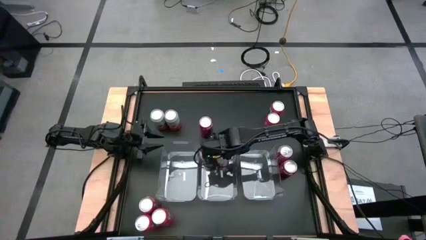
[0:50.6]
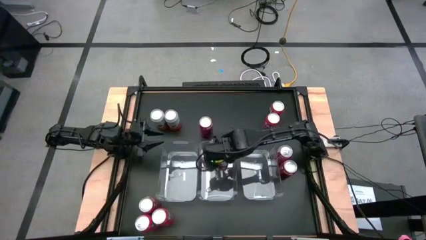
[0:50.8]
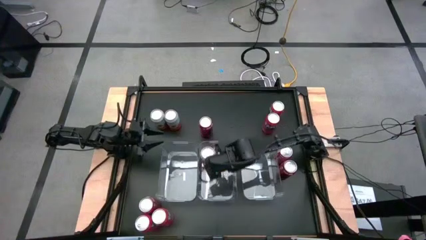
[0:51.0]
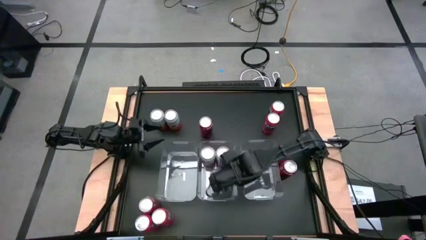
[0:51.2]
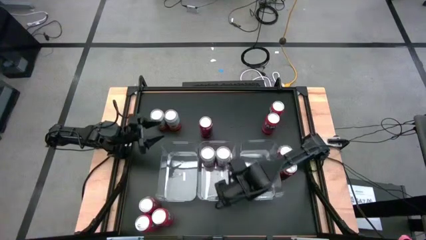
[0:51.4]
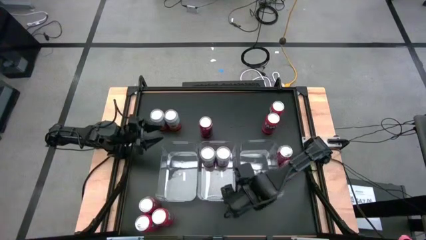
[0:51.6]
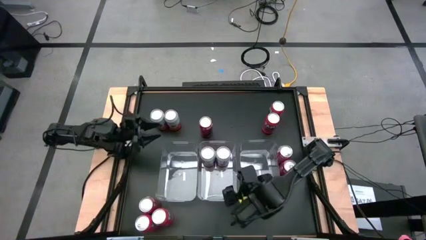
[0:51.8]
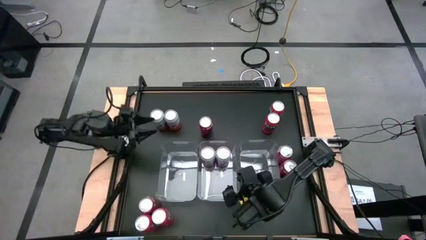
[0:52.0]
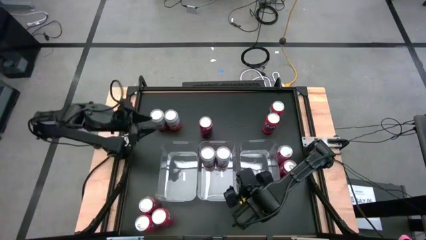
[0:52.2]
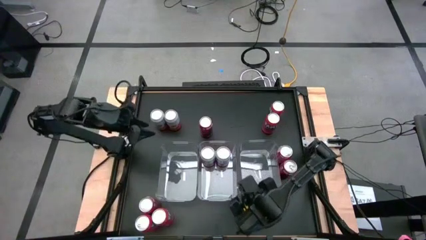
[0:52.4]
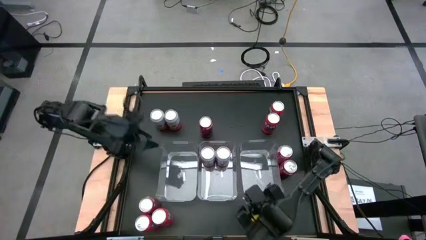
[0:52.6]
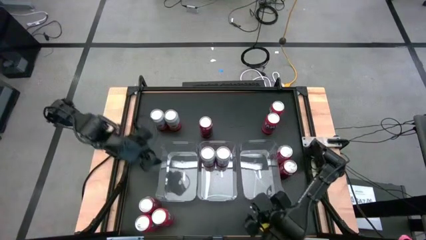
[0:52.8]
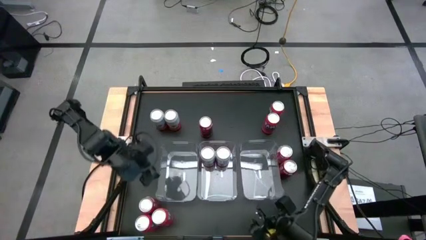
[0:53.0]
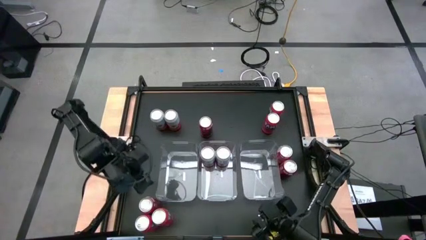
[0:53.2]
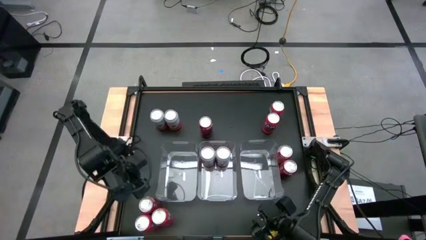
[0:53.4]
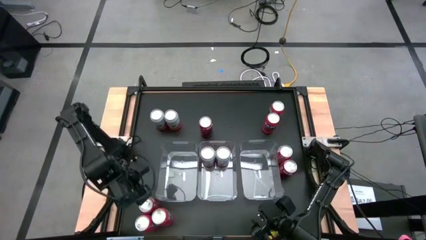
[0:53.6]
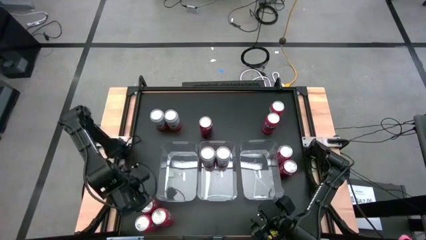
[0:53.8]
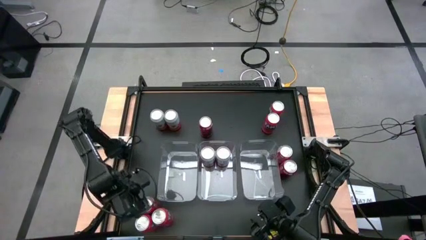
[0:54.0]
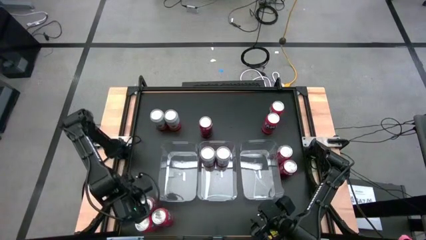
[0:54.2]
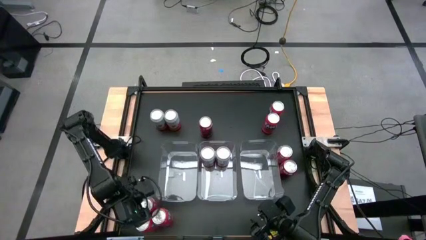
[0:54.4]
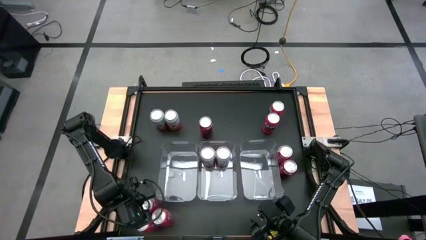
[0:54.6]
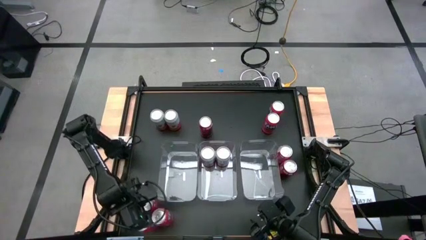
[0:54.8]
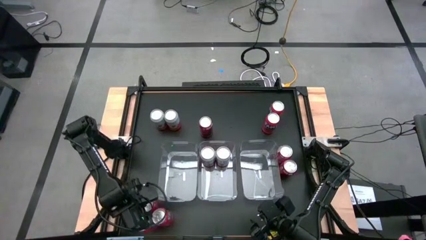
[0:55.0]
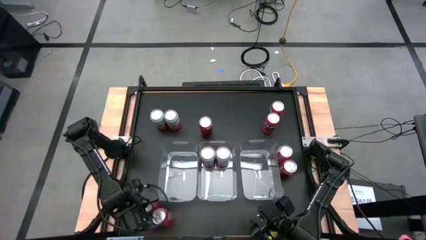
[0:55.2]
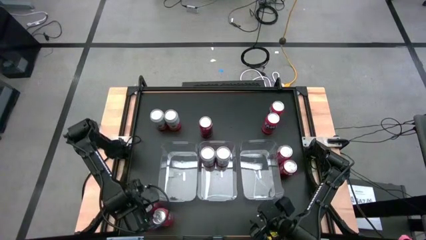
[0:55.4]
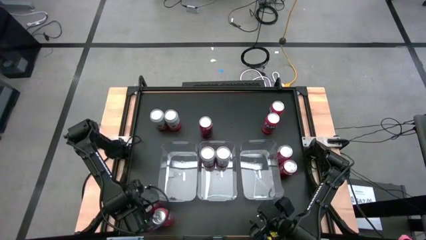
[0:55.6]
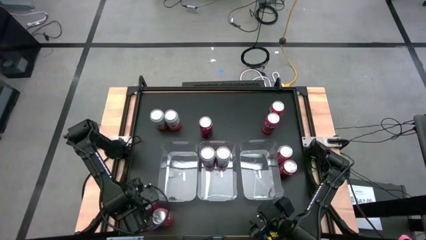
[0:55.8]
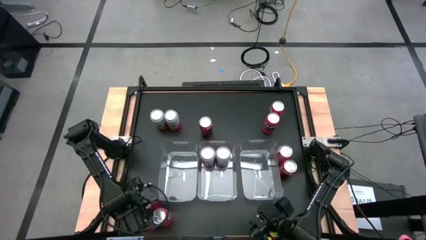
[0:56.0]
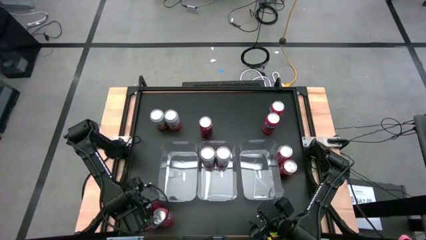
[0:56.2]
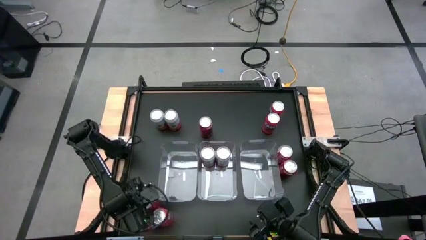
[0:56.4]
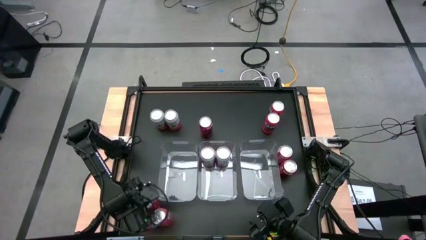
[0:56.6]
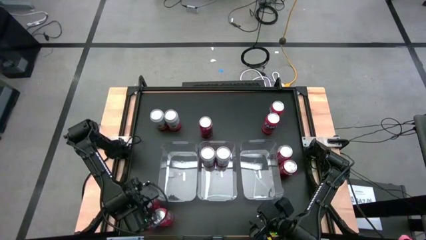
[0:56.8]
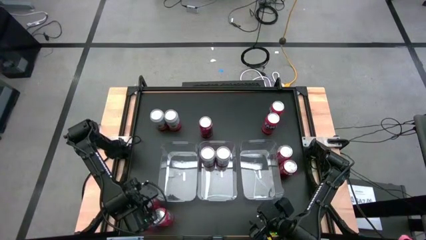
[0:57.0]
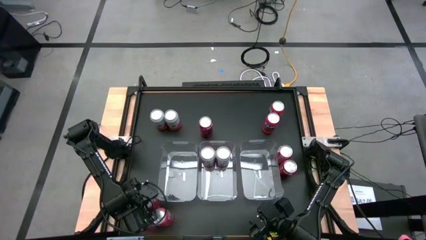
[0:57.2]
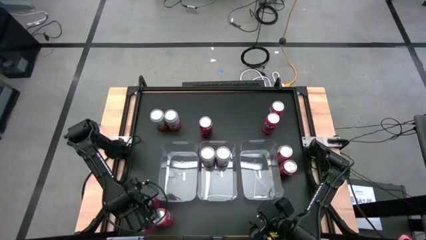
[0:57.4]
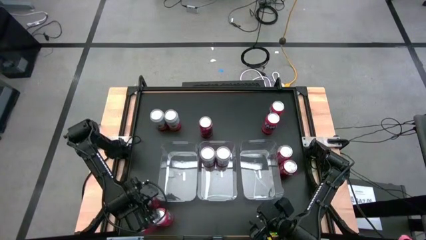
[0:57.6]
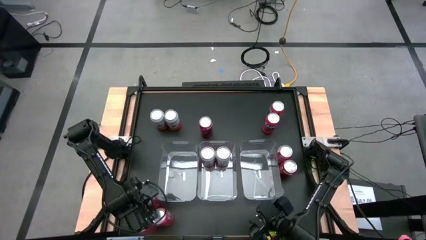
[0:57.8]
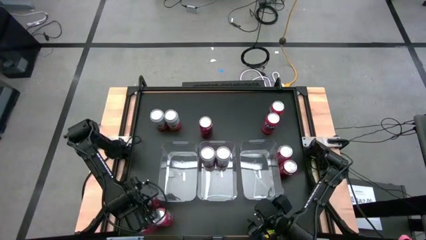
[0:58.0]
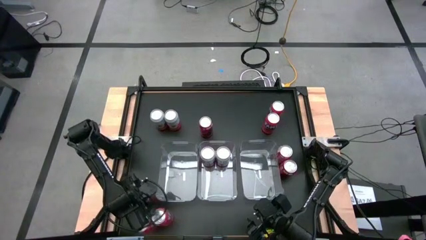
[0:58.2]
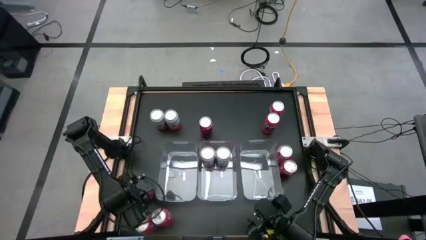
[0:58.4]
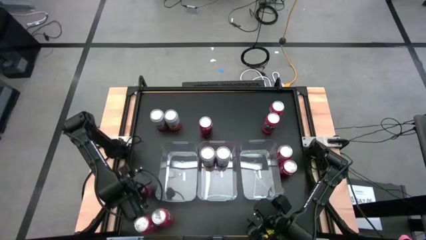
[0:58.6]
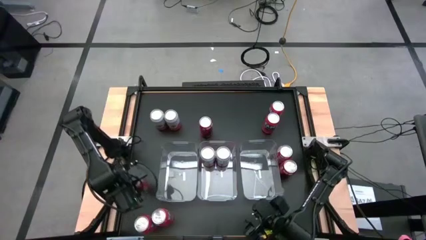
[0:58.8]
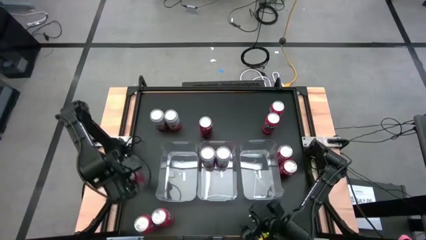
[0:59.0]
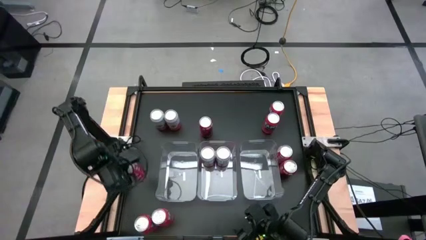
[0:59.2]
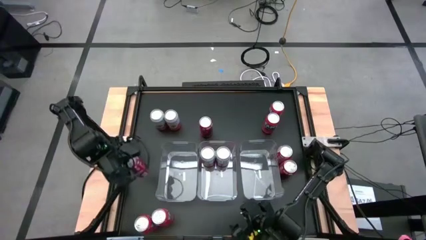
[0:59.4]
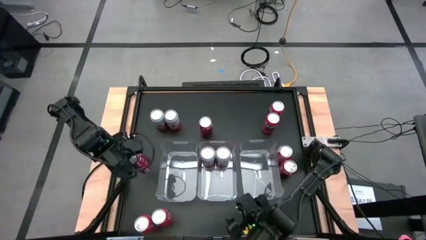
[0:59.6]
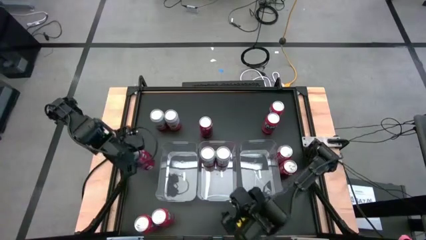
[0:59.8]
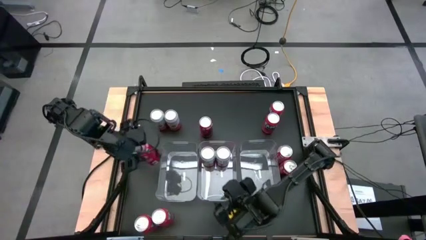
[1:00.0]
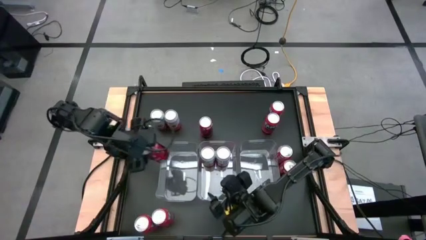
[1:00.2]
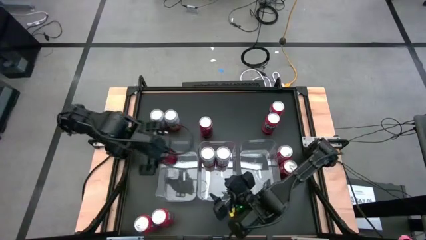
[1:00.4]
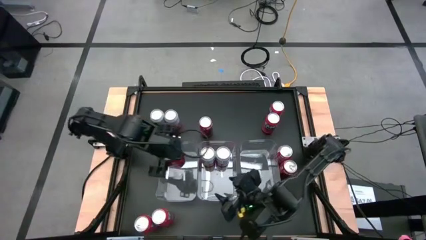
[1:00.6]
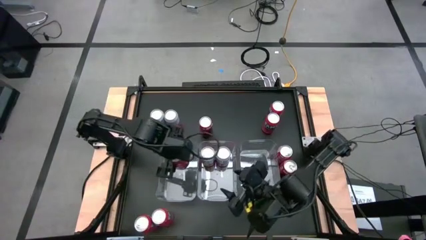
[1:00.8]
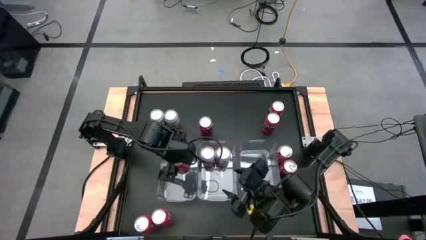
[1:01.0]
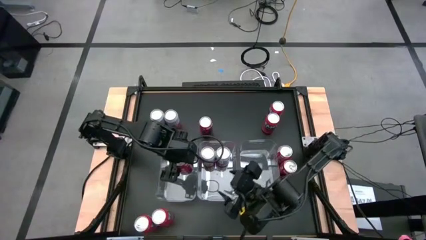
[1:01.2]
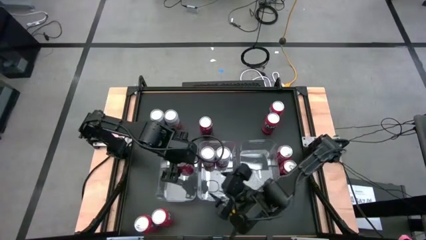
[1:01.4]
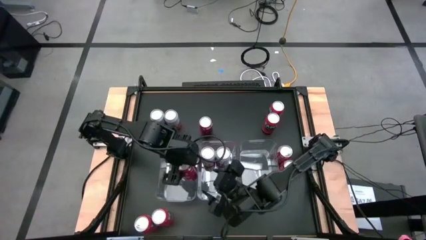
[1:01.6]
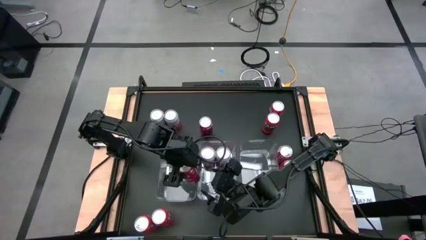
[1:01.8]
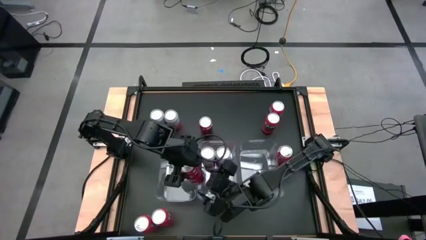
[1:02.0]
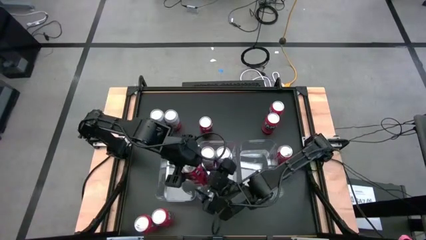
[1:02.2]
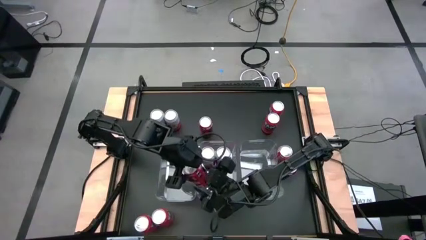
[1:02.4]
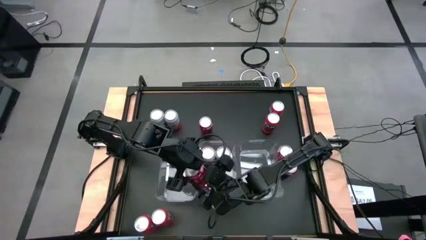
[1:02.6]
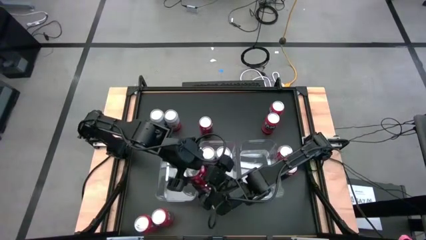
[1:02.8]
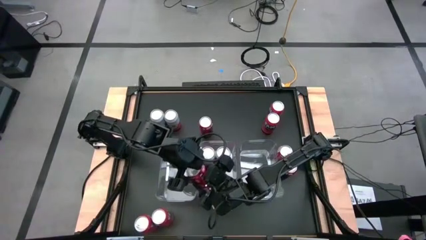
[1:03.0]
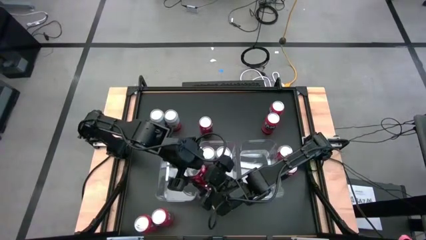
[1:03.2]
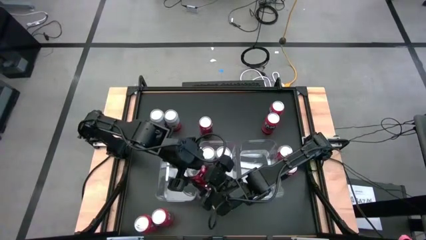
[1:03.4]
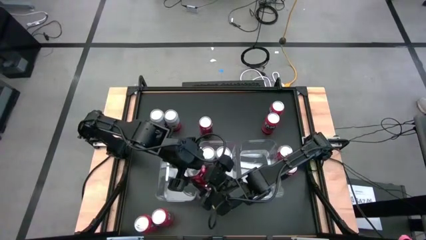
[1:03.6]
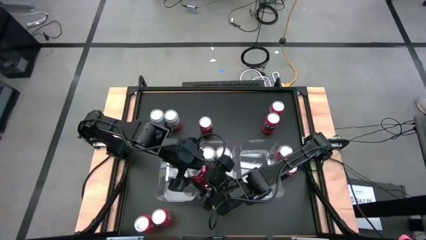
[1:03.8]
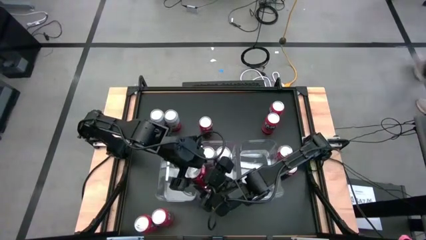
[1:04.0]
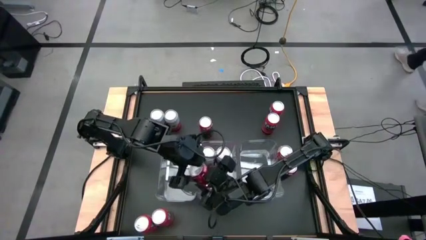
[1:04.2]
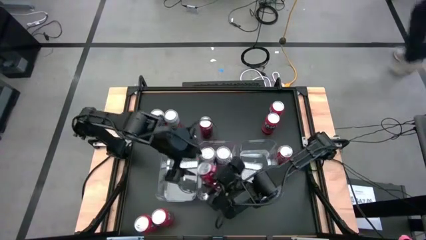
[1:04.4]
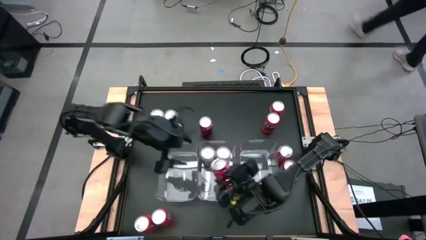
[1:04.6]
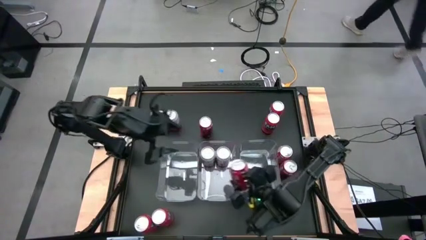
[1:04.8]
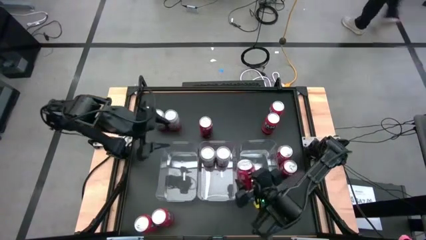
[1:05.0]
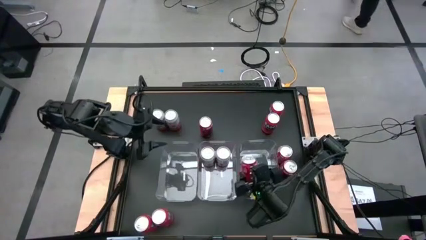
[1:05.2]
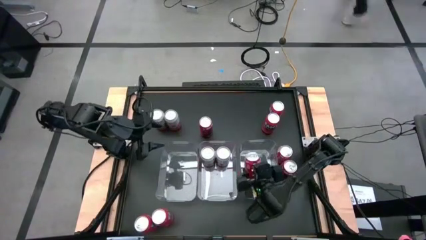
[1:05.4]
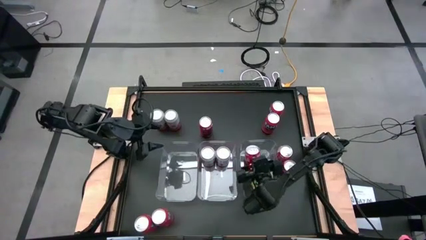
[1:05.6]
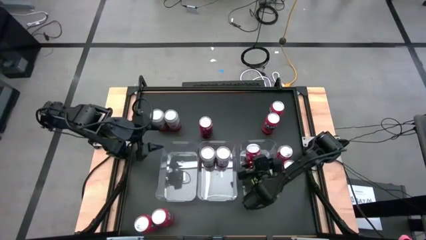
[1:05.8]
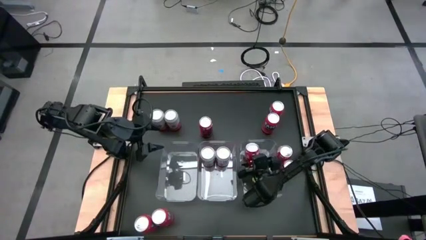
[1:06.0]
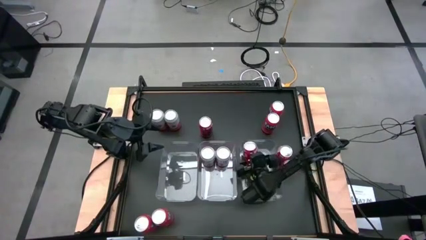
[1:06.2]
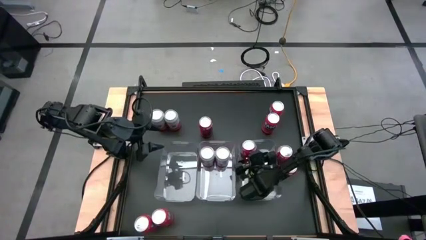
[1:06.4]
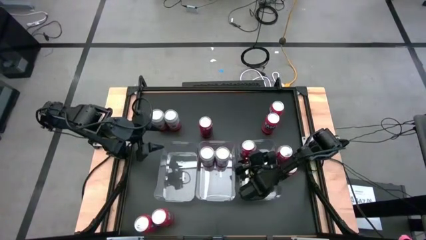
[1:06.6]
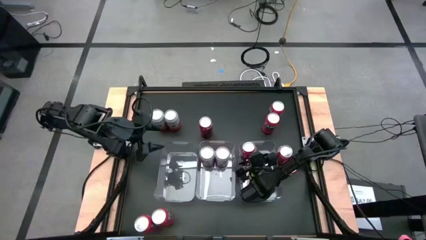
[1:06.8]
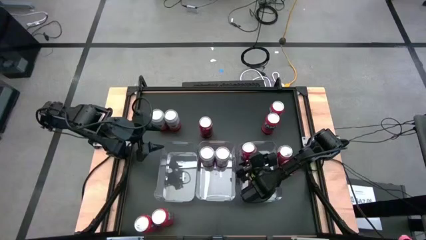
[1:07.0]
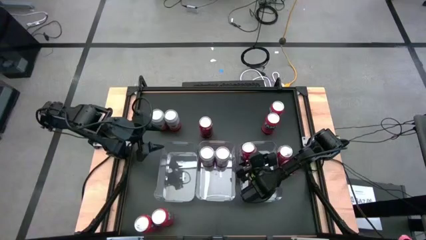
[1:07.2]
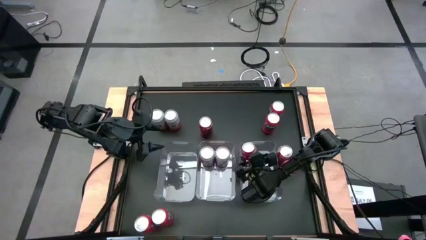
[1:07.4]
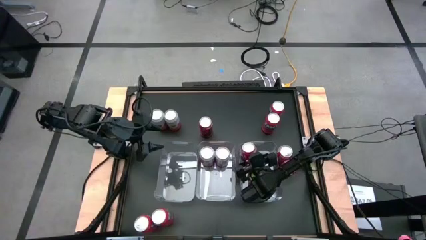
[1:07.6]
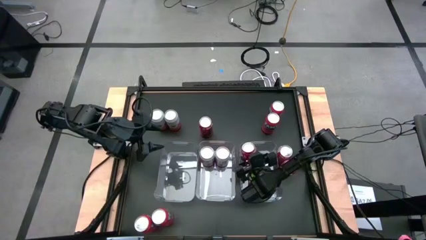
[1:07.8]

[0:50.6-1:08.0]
Task: Sort soda cans
Put the red soda can into the right transparent bin

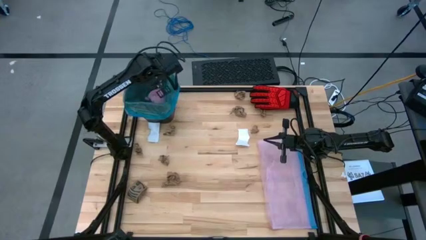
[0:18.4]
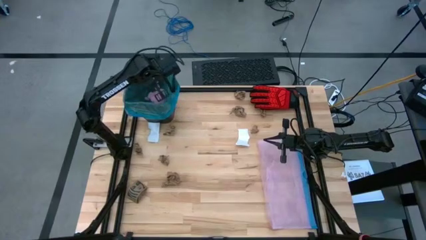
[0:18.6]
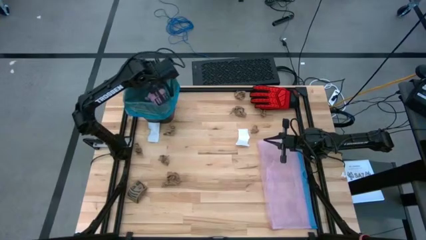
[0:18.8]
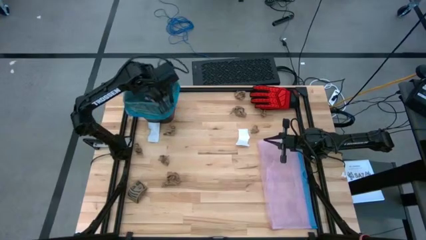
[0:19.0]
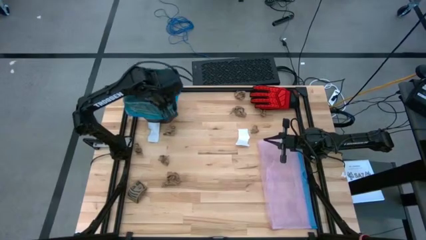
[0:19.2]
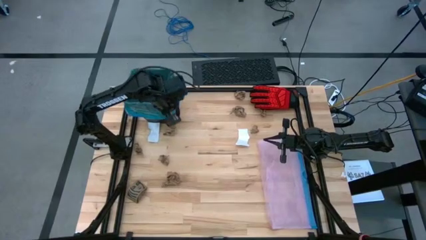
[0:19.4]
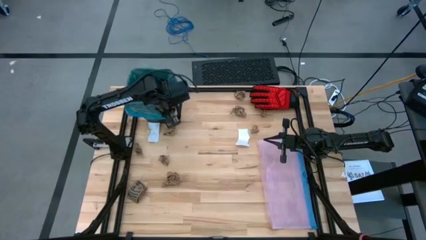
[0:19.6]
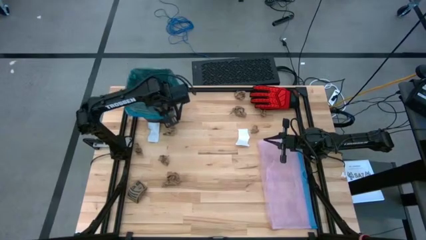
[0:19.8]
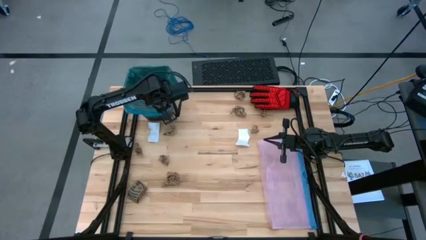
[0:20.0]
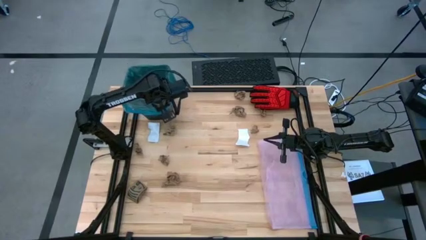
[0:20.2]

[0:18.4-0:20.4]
Task: place trash/remove bag and relplace
Adjust the black trash bin on the top of the table
